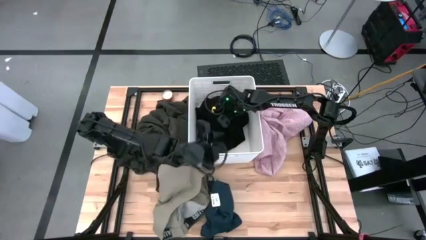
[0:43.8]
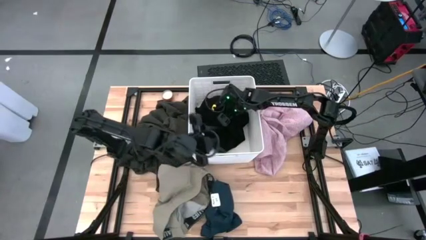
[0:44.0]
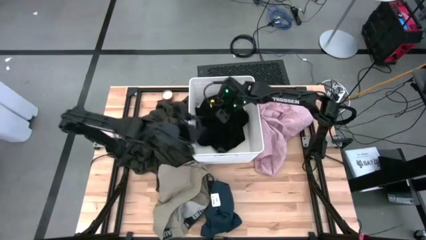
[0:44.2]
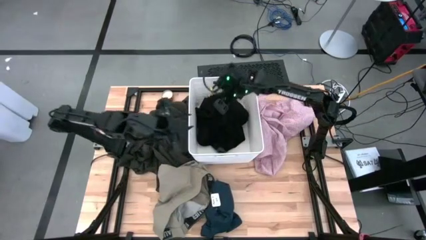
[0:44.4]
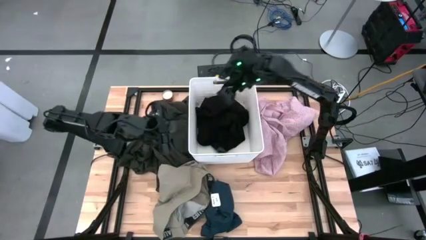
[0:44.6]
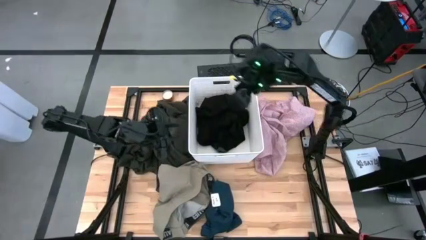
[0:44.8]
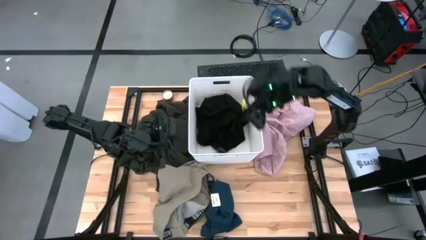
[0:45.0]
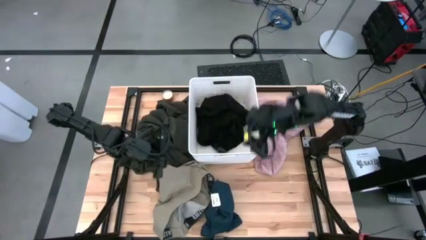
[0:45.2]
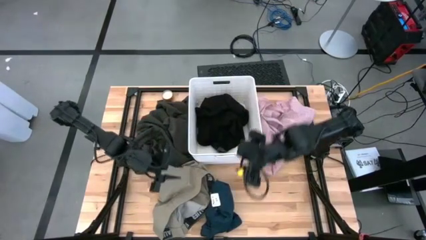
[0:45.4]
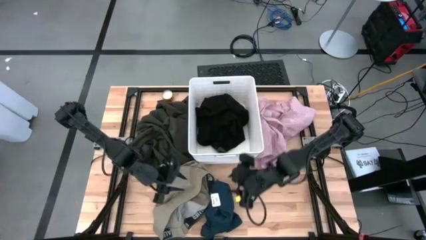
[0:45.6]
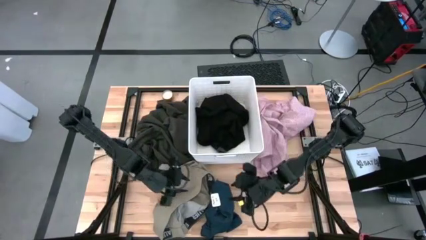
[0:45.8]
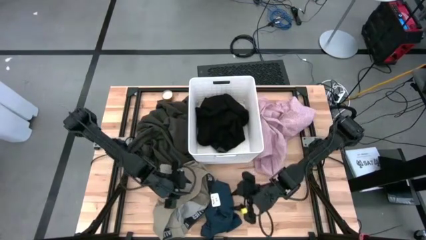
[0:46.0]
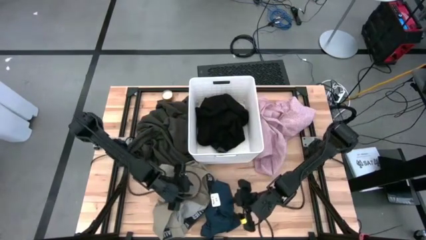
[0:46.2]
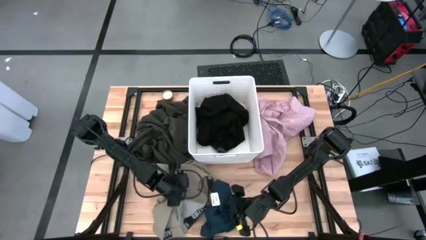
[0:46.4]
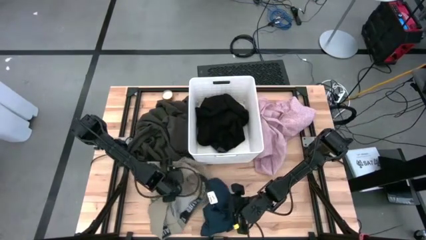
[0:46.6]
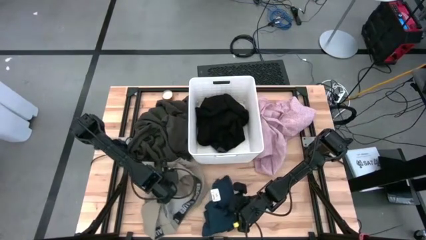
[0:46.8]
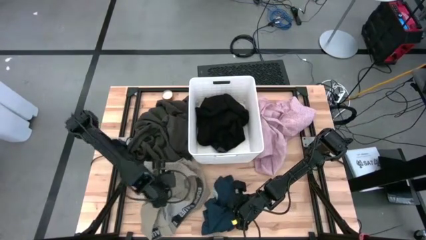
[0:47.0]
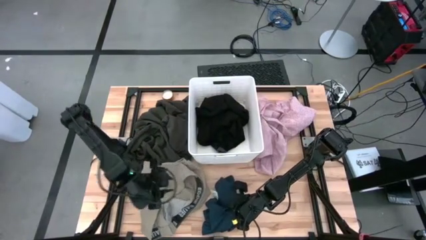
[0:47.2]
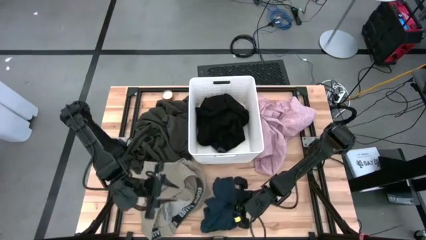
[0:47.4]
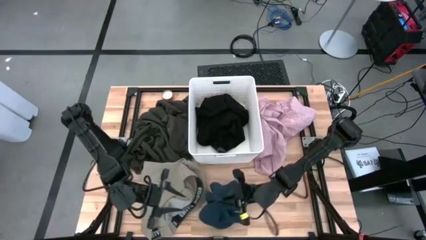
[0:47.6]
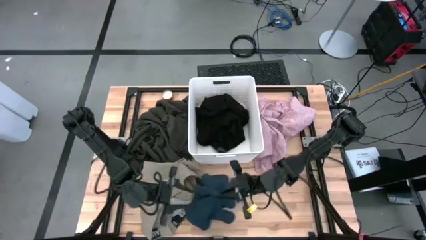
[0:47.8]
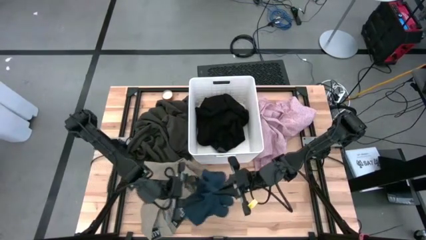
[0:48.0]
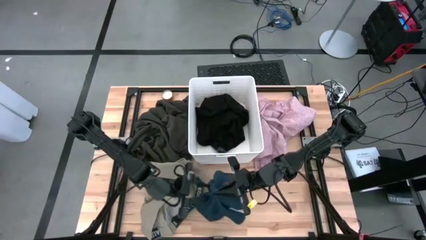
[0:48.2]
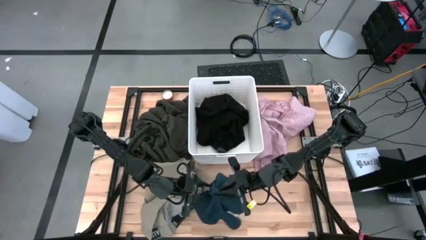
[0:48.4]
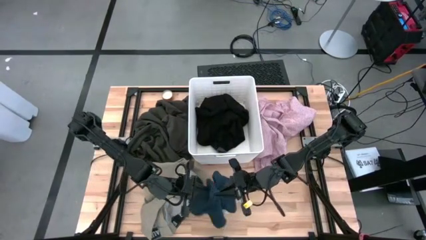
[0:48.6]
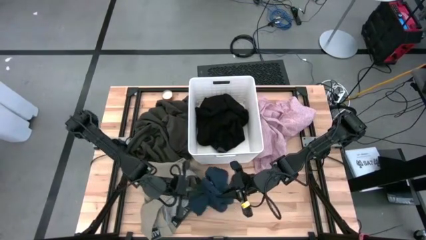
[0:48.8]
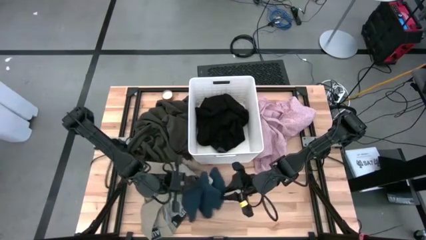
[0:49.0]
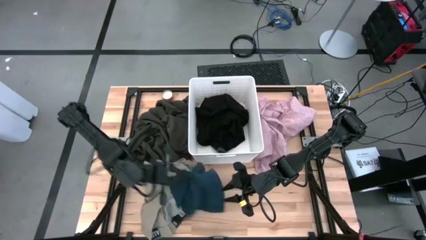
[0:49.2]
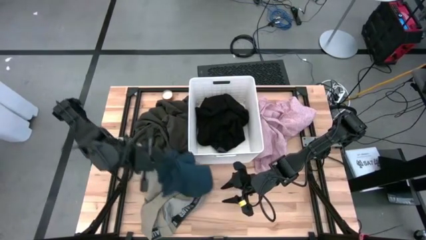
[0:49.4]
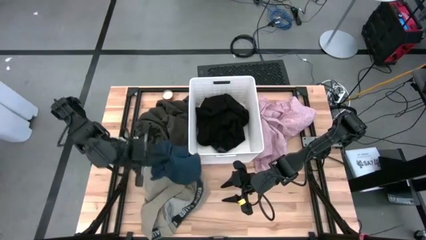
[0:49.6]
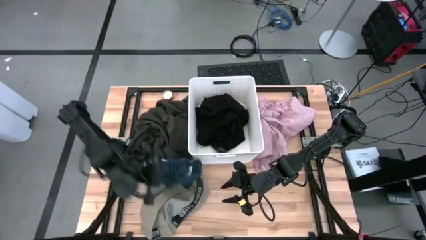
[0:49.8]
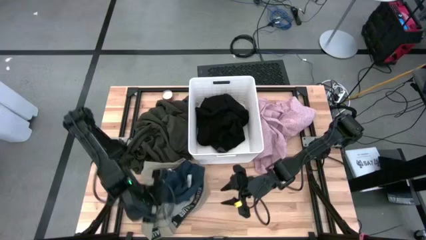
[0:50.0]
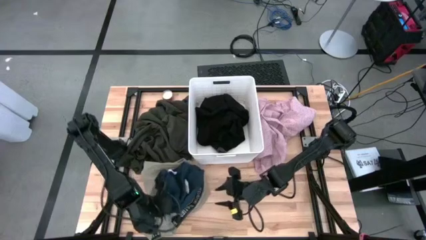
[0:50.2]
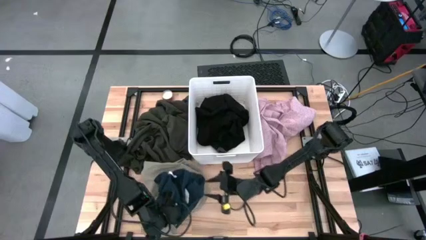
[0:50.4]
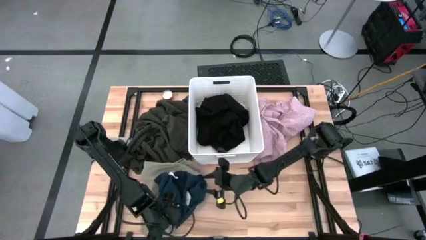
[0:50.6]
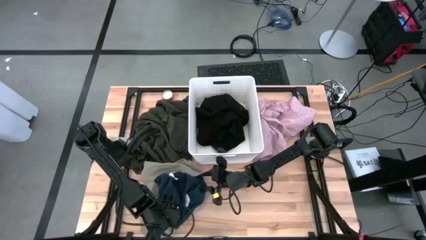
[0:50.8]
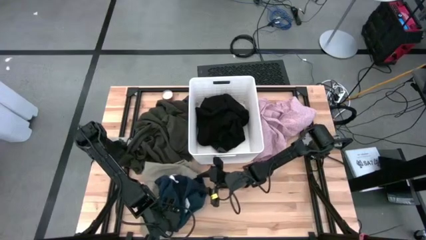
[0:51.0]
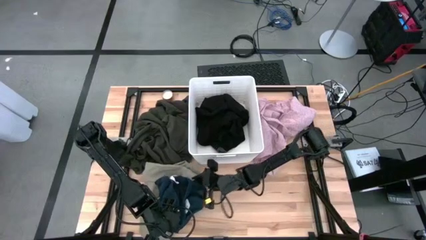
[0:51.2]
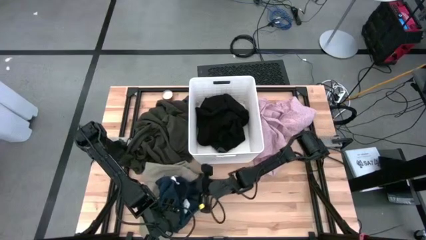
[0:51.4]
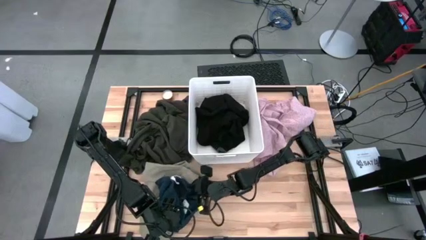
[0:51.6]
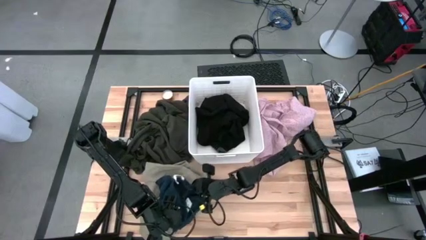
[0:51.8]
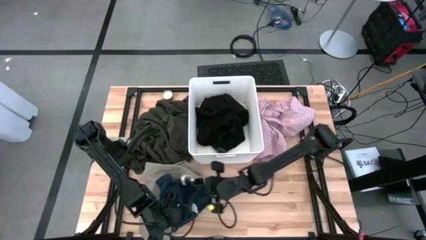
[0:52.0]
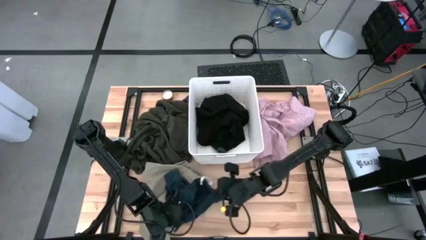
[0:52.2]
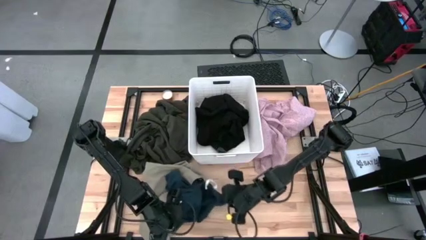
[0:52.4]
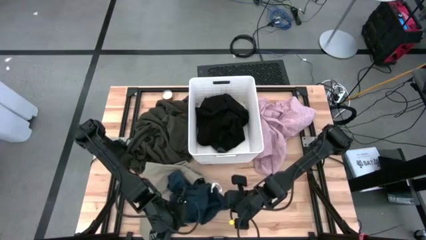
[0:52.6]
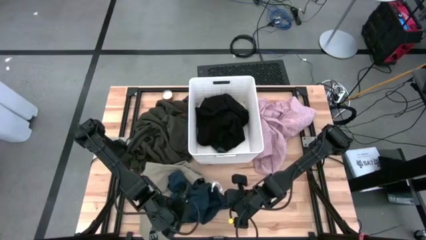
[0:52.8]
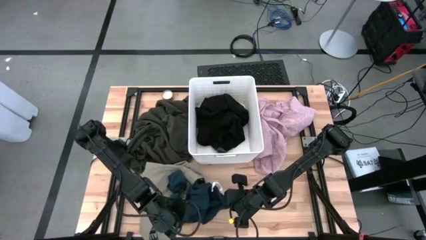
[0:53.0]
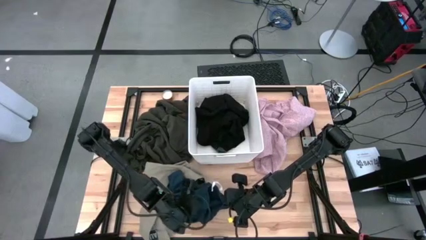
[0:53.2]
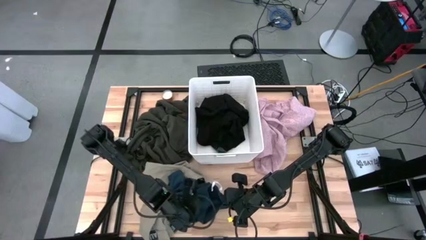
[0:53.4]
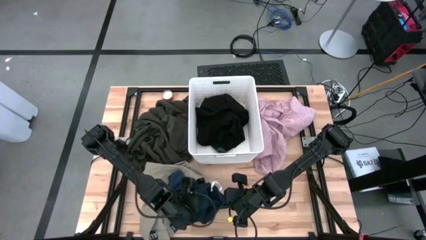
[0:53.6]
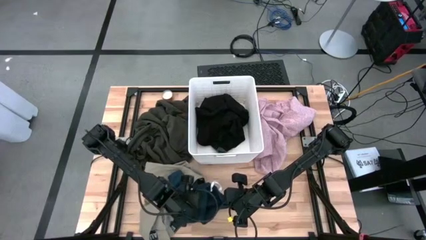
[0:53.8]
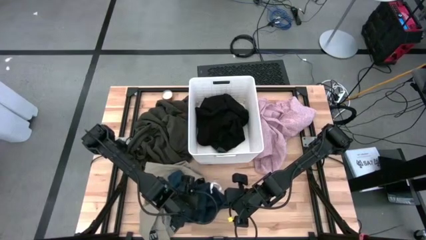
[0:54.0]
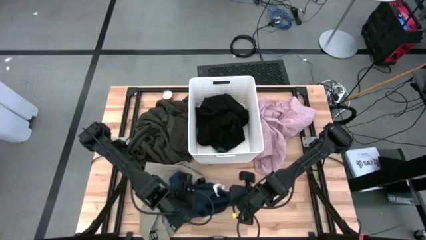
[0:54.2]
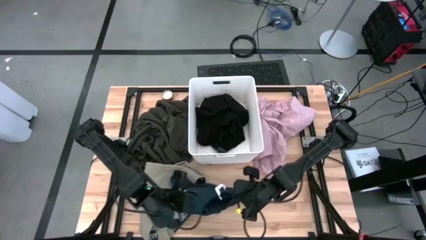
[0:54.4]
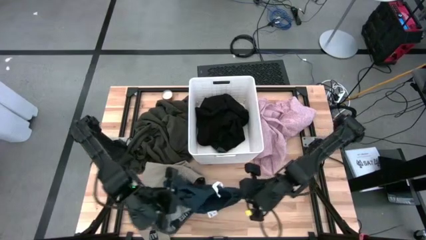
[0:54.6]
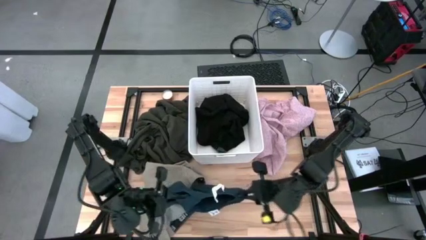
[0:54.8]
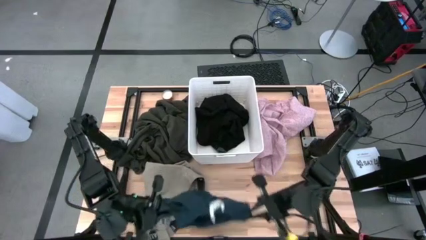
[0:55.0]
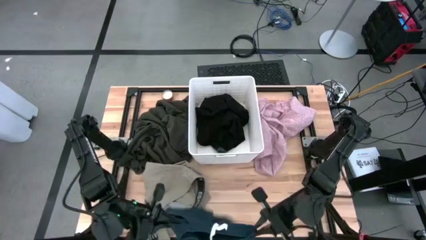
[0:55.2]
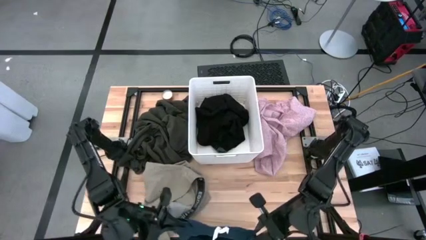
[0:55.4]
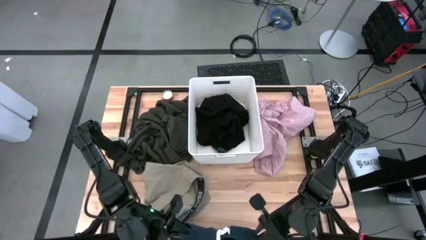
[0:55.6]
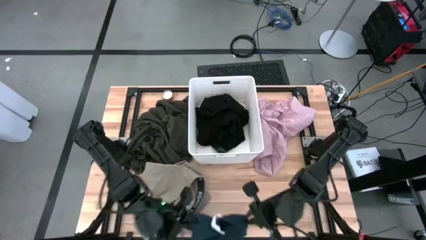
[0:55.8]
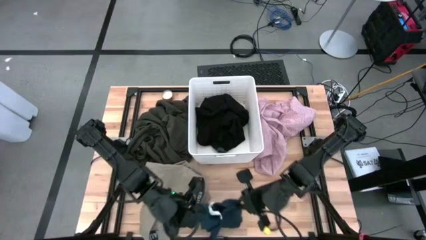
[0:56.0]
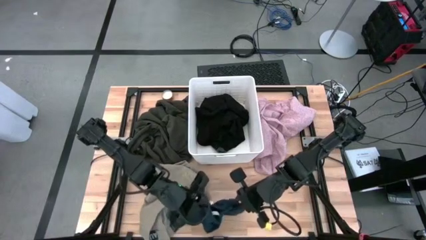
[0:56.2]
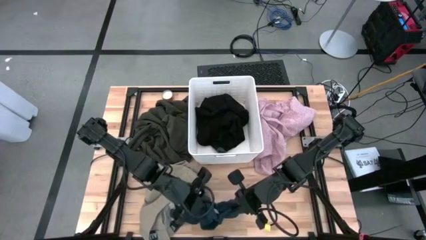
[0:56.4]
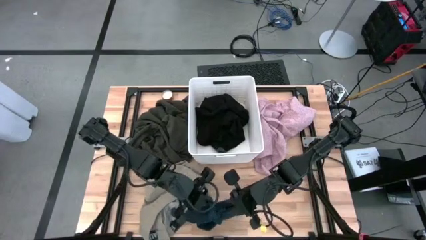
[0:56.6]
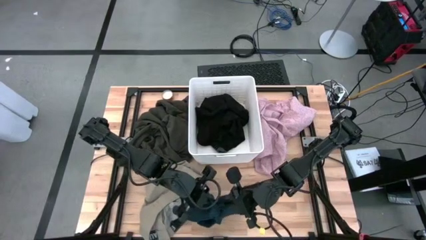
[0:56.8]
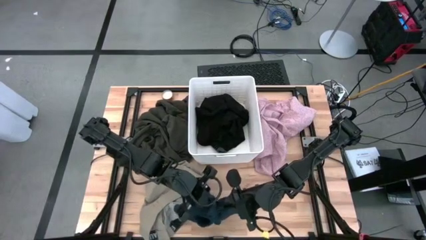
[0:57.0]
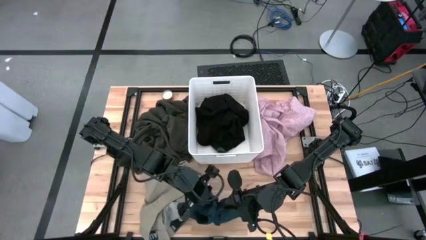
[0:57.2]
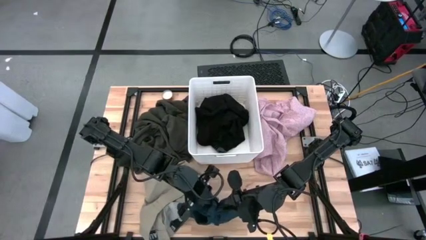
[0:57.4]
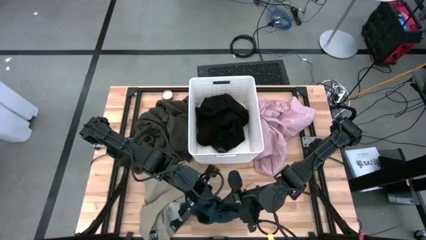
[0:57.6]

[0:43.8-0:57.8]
Task: Sort clothes
Put the blue shorts into the laundry bin

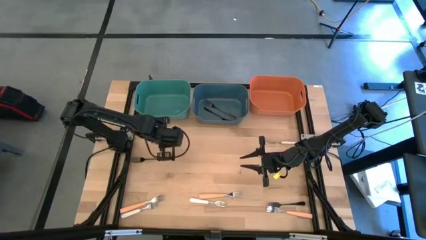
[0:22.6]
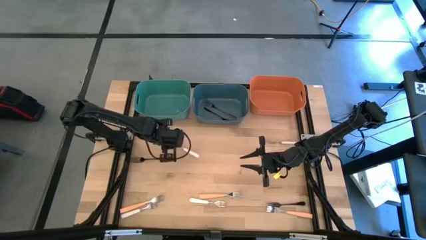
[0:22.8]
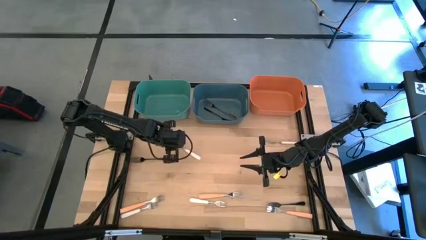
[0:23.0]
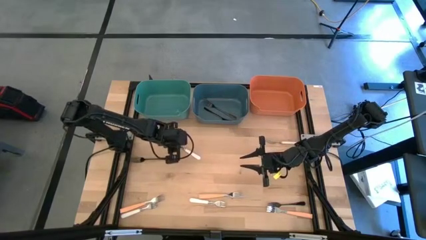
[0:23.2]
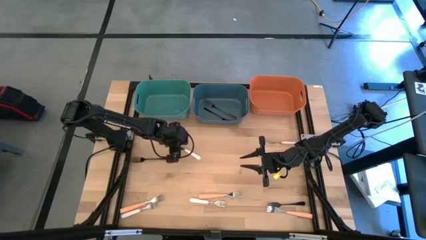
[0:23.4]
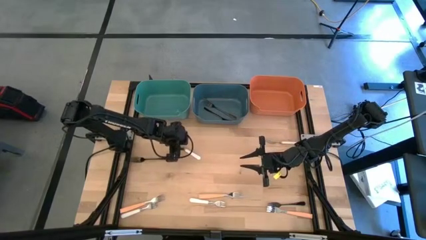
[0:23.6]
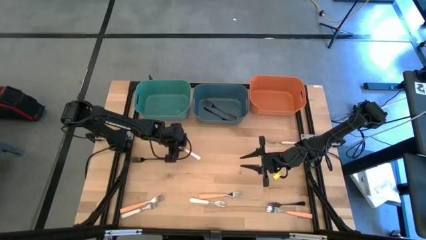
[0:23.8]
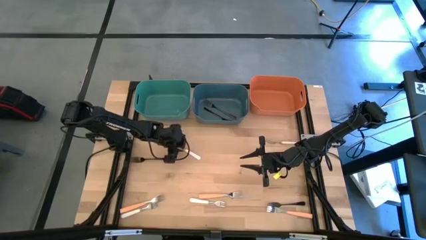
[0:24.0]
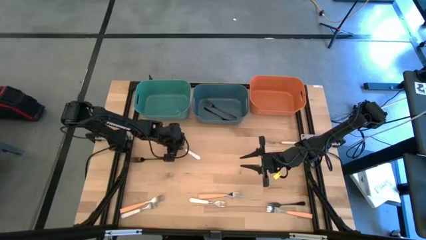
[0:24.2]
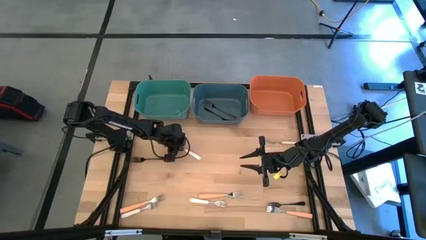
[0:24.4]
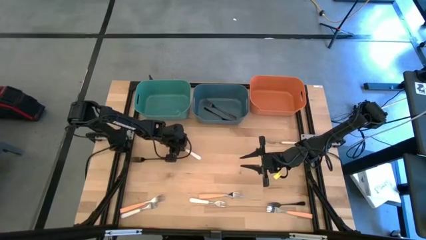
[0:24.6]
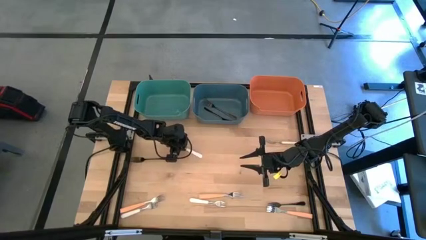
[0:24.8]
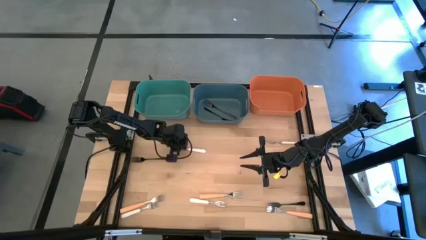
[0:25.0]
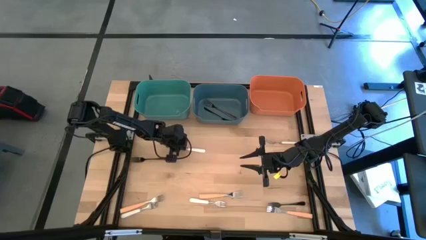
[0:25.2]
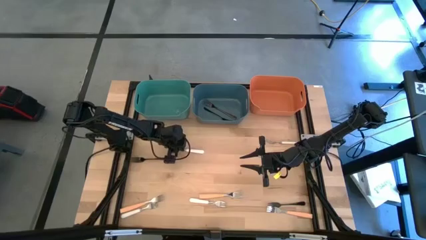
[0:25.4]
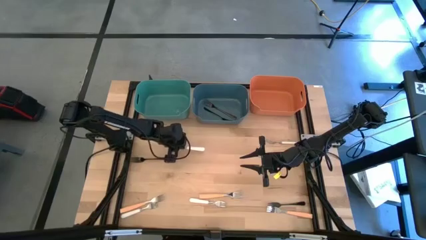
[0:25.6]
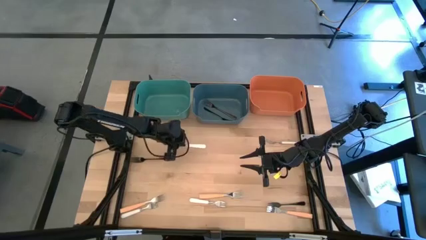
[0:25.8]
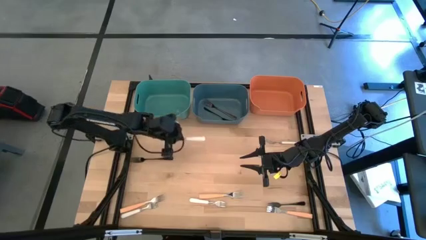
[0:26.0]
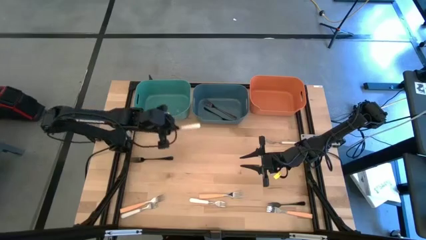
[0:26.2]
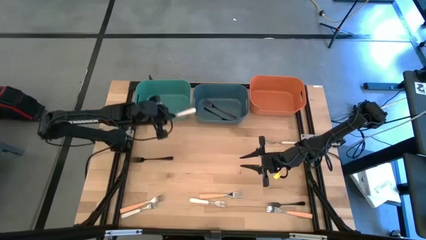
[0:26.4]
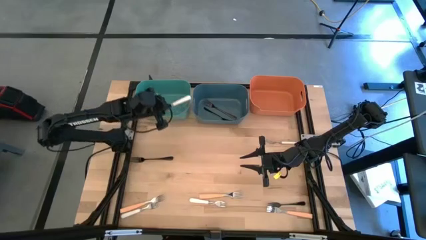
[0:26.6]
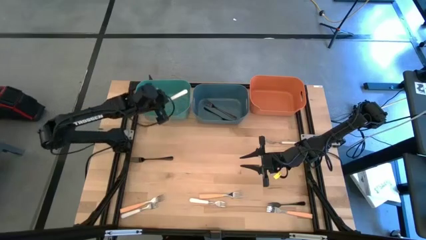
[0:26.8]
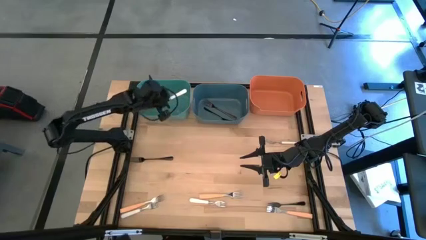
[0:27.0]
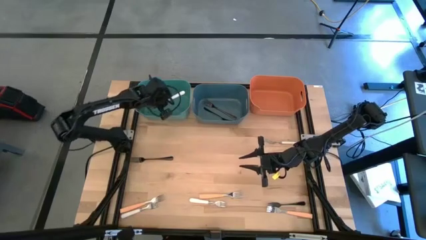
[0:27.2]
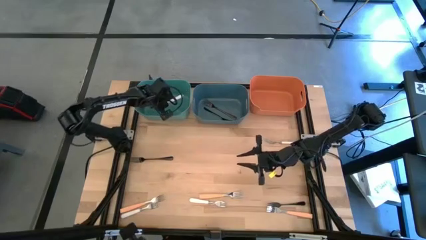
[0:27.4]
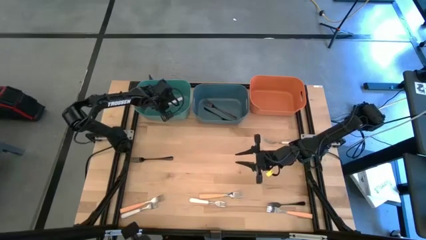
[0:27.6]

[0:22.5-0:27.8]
Task: Sort silverware by color (type)
Put the top left white fork into the green bin
